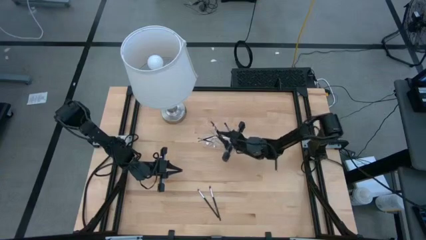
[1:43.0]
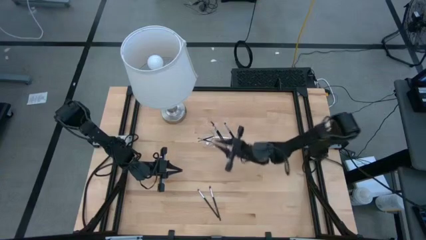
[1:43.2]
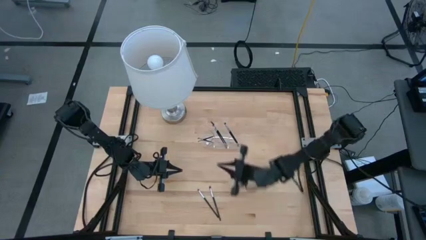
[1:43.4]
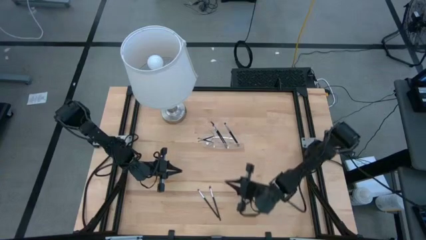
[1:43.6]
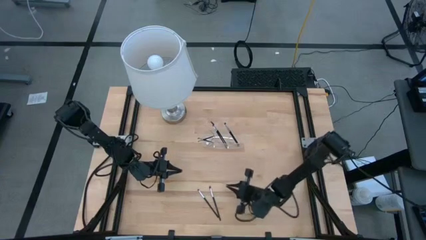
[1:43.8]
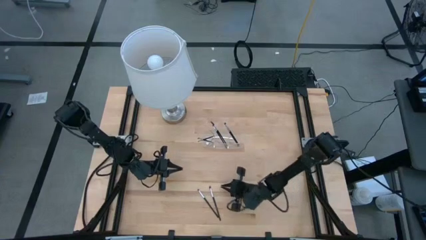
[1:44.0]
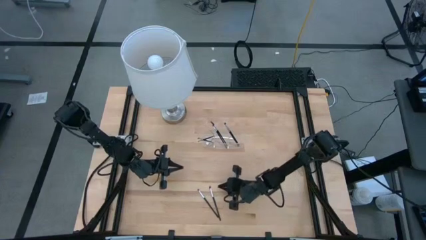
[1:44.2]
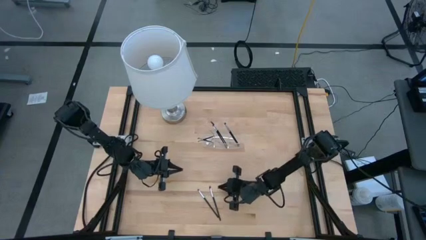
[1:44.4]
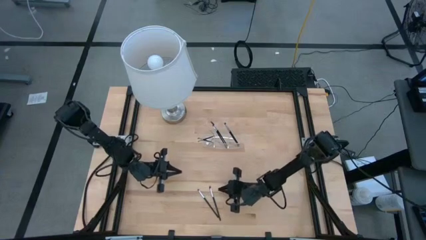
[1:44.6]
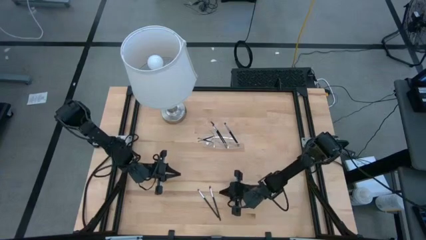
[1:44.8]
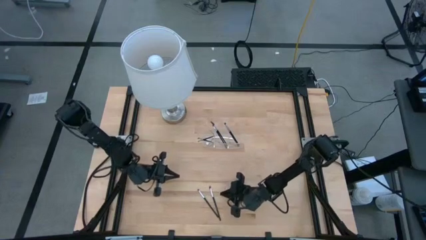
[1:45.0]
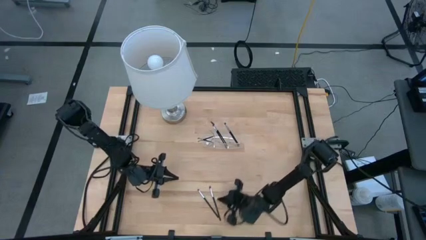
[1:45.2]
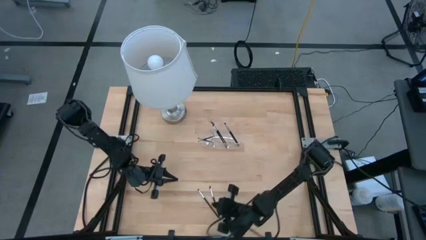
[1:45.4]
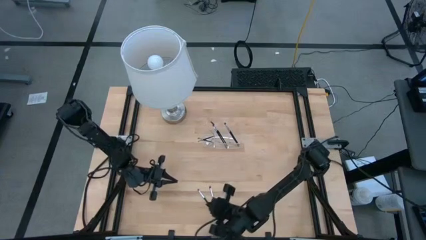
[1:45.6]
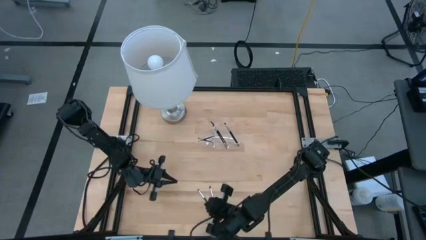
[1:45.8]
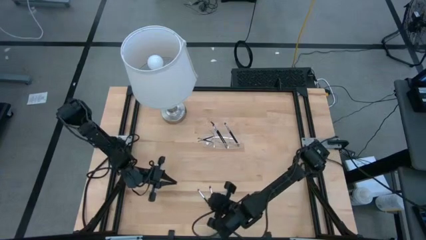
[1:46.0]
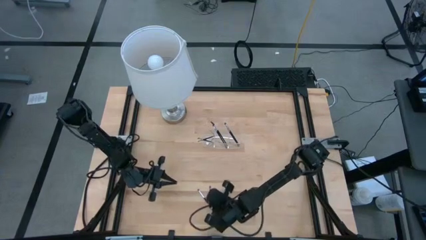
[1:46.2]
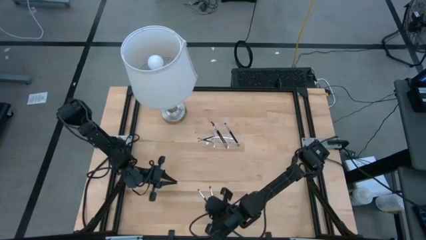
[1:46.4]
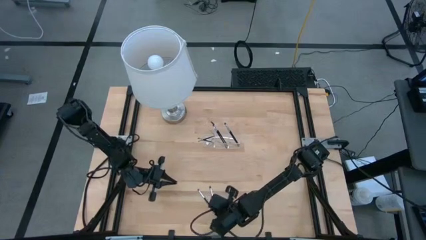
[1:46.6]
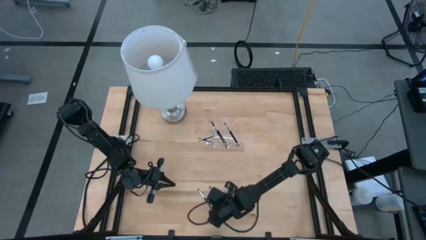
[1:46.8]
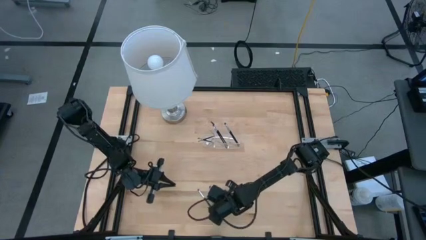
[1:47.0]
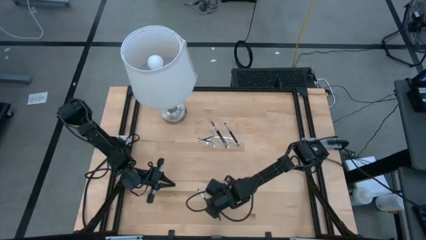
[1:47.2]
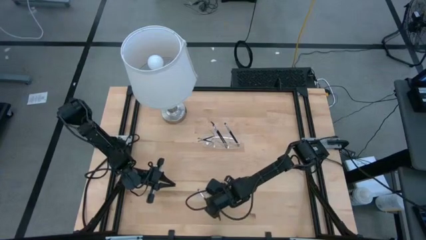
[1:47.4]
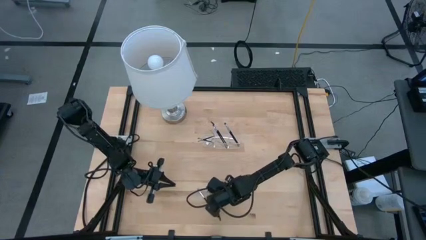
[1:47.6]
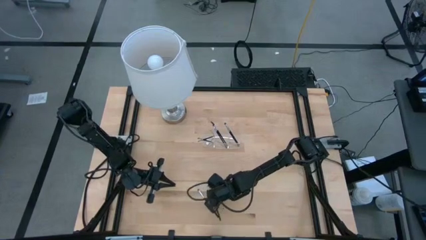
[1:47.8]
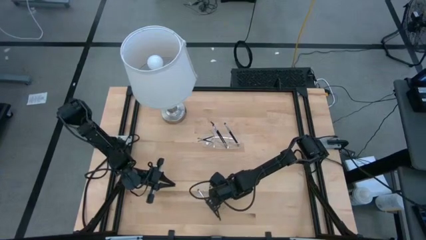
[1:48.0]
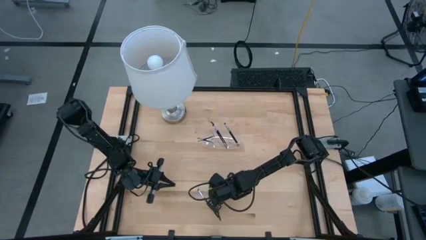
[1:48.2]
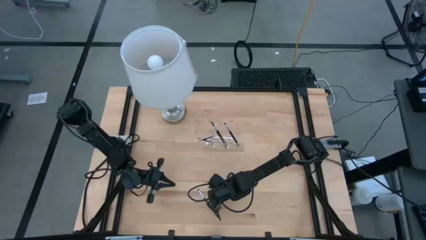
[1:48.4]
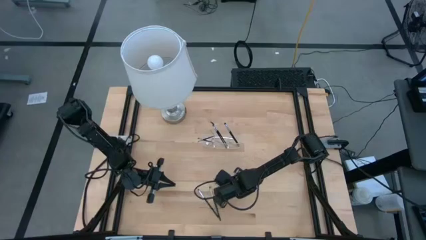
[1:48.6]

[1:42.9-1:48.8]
Task: Sort items
Put the eyeshadow brush into the transparent organizer

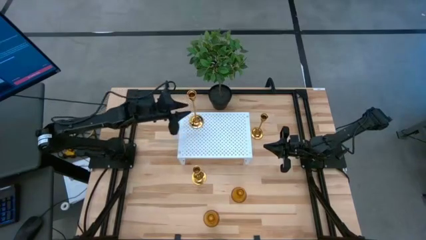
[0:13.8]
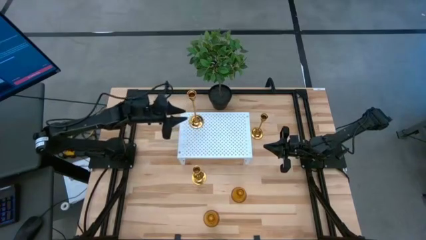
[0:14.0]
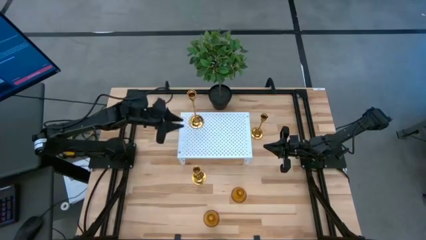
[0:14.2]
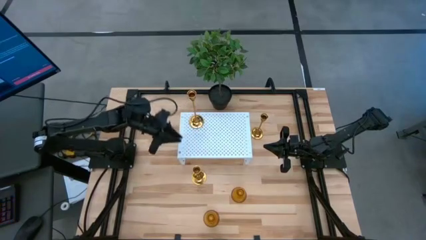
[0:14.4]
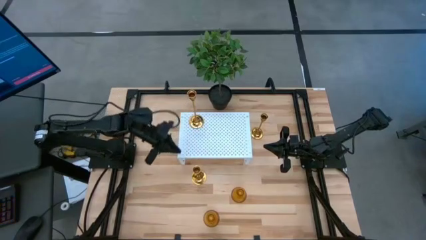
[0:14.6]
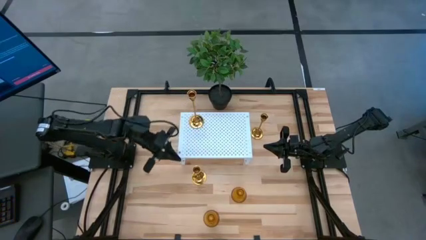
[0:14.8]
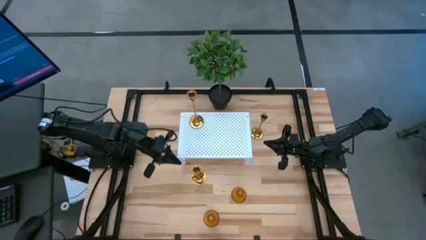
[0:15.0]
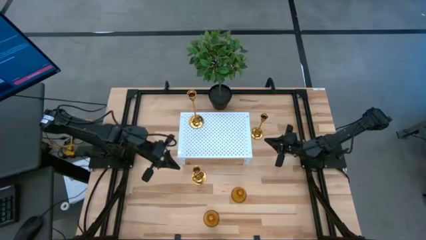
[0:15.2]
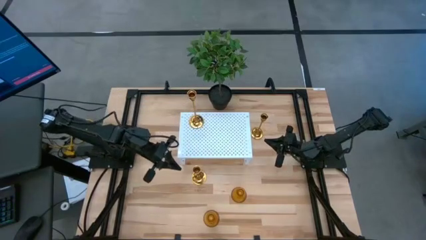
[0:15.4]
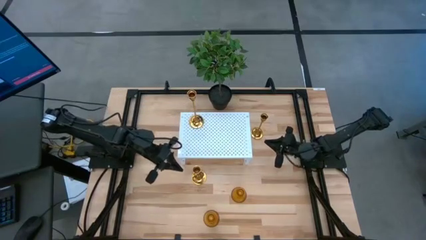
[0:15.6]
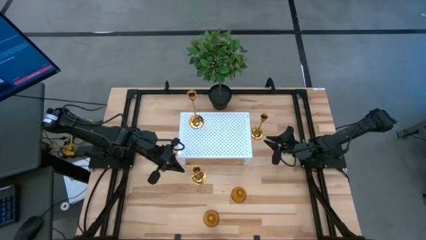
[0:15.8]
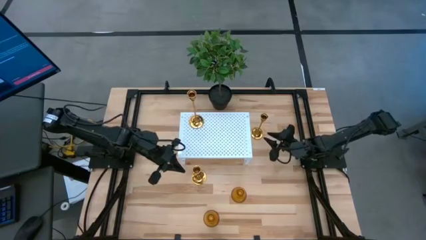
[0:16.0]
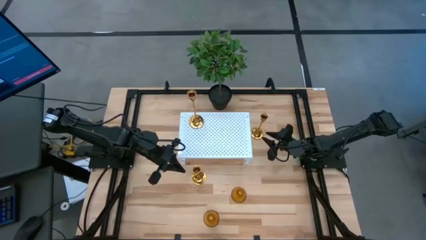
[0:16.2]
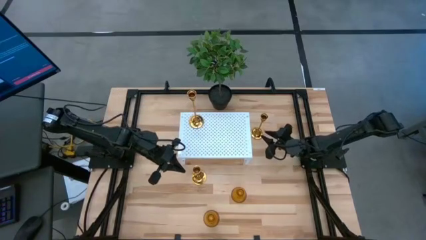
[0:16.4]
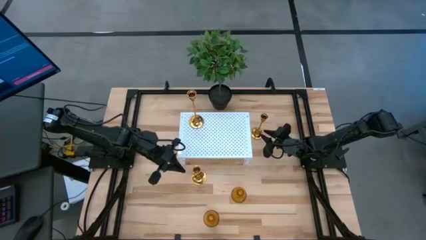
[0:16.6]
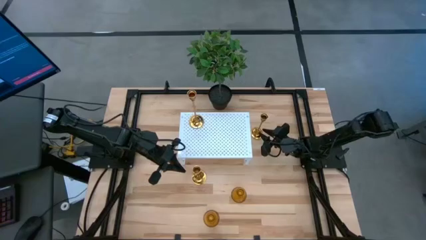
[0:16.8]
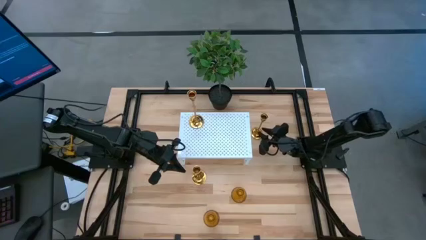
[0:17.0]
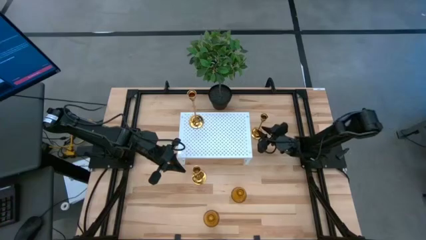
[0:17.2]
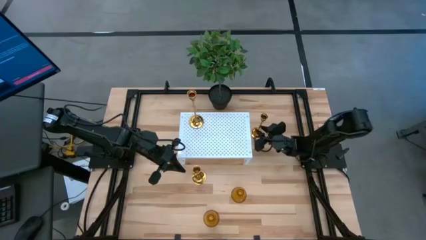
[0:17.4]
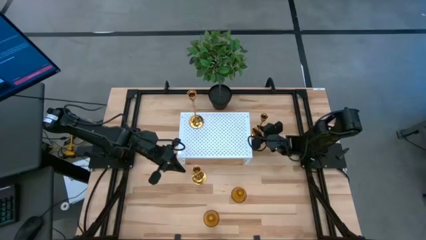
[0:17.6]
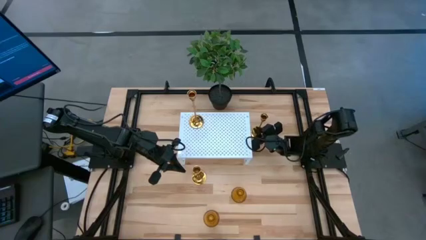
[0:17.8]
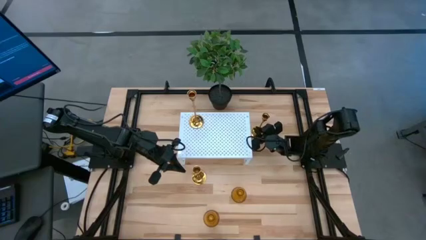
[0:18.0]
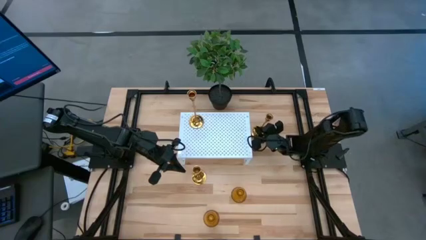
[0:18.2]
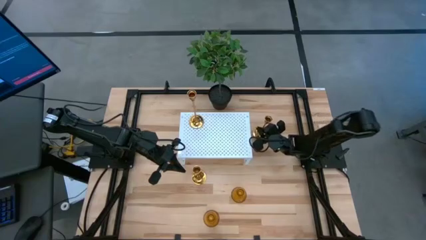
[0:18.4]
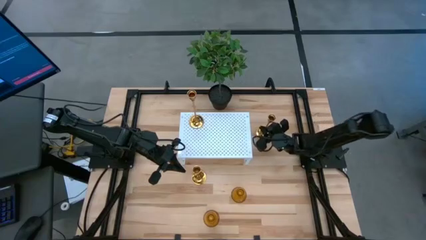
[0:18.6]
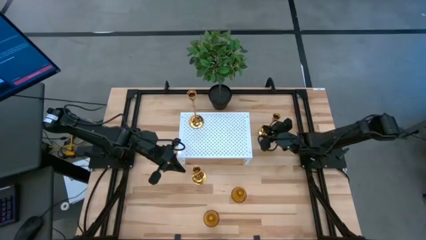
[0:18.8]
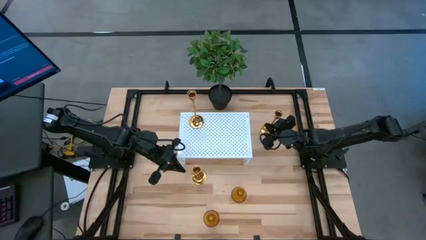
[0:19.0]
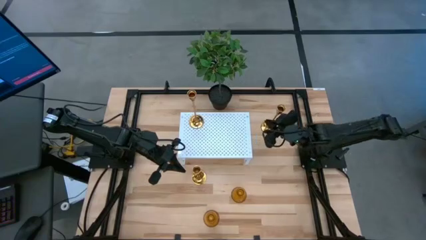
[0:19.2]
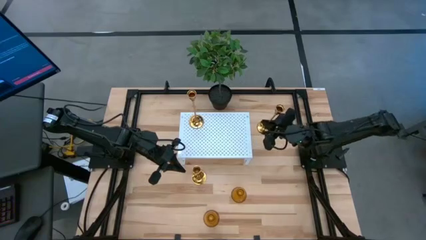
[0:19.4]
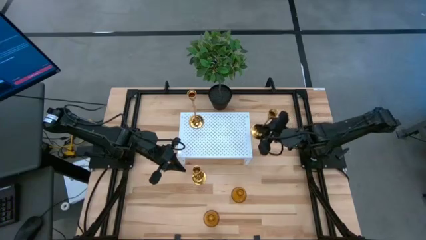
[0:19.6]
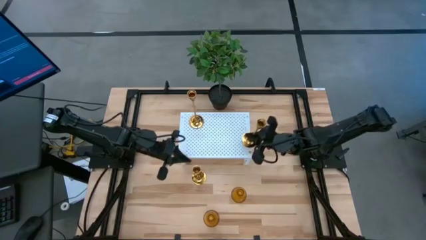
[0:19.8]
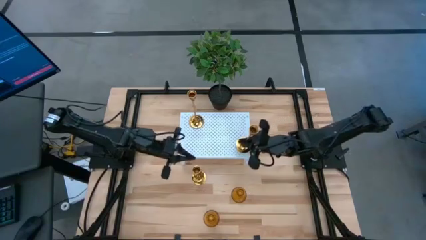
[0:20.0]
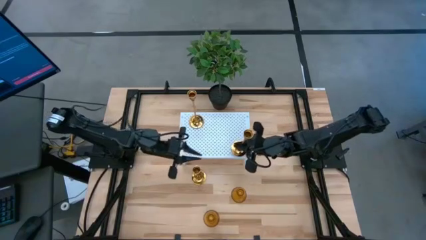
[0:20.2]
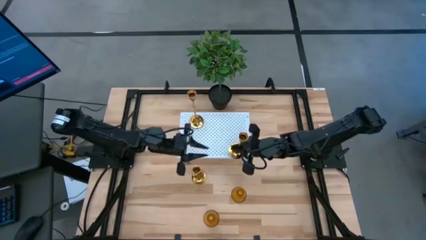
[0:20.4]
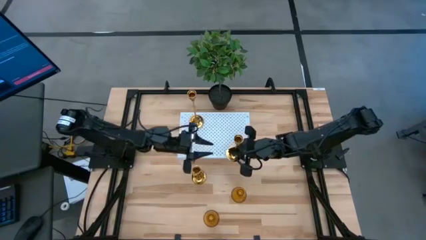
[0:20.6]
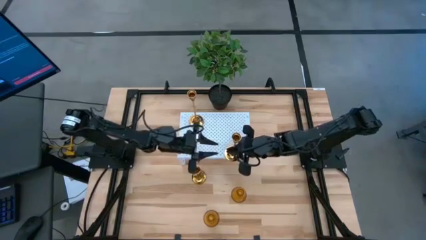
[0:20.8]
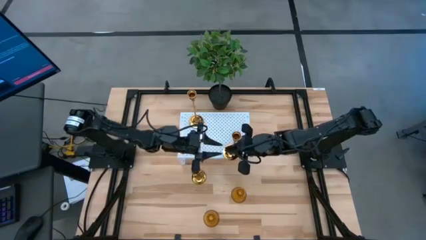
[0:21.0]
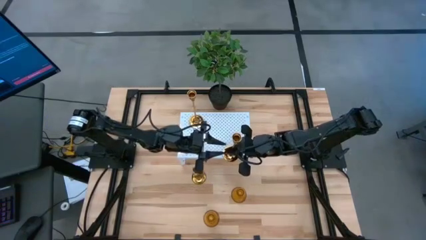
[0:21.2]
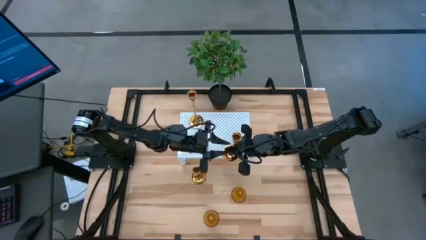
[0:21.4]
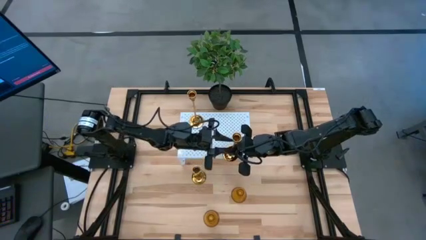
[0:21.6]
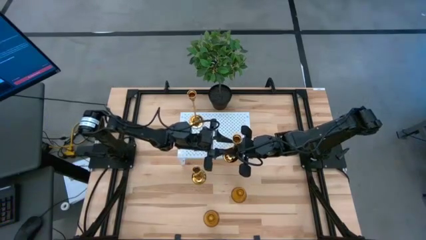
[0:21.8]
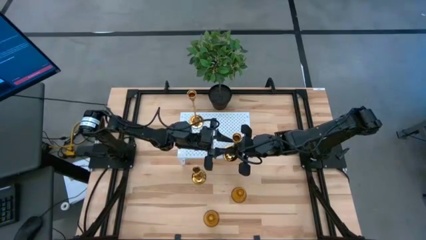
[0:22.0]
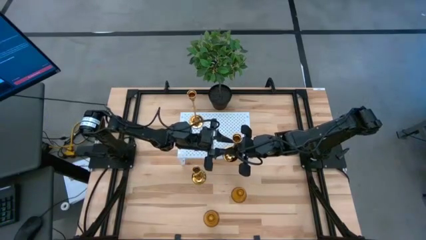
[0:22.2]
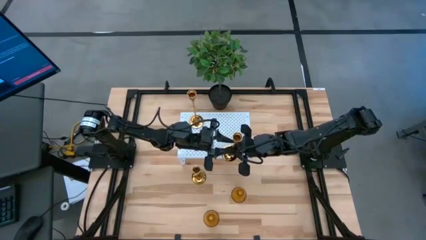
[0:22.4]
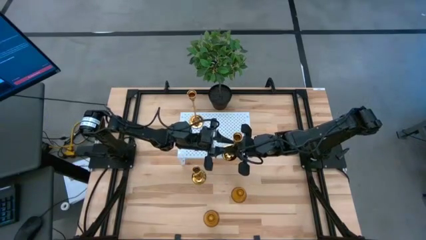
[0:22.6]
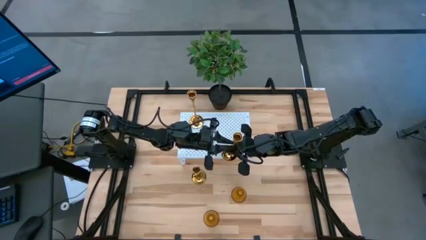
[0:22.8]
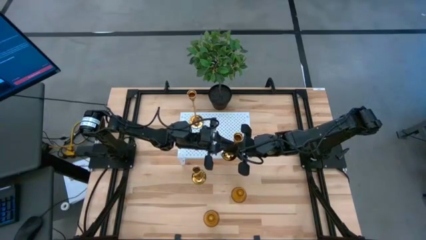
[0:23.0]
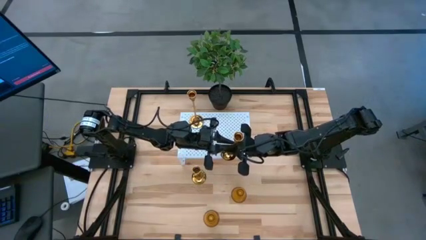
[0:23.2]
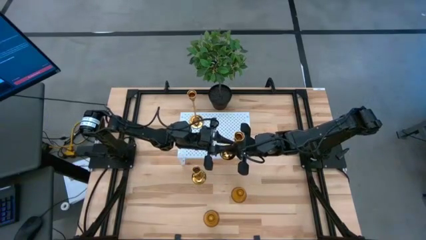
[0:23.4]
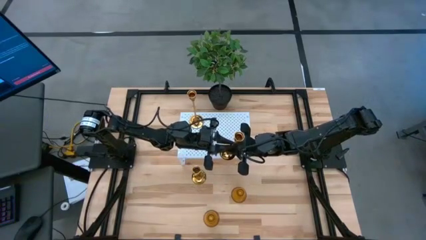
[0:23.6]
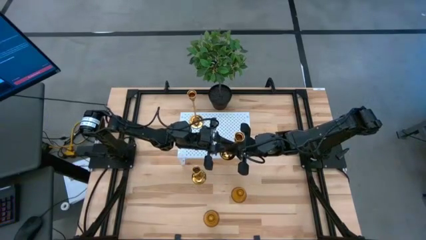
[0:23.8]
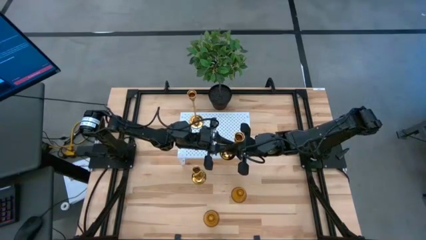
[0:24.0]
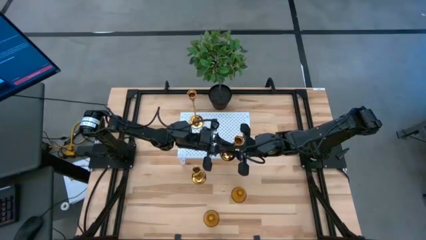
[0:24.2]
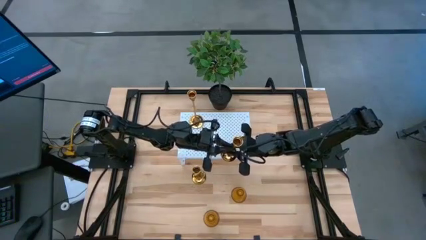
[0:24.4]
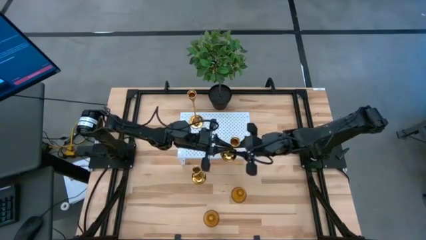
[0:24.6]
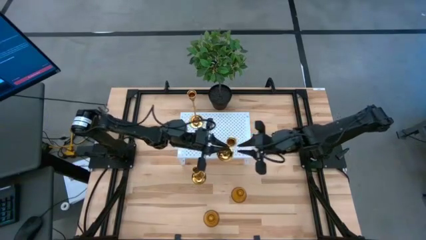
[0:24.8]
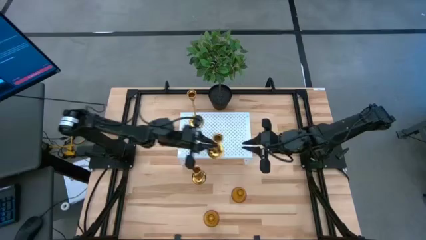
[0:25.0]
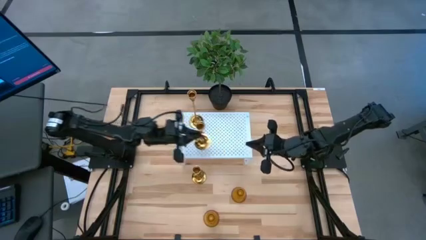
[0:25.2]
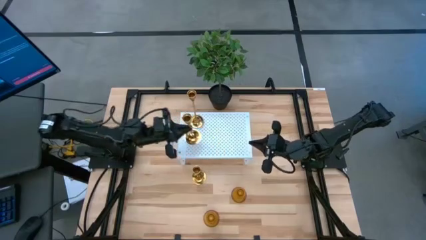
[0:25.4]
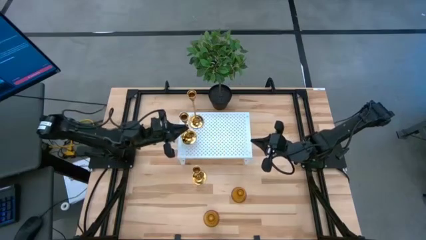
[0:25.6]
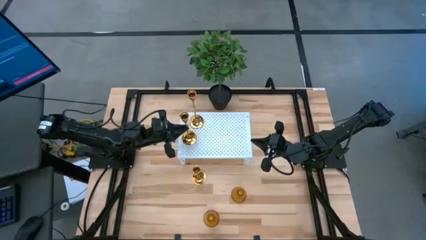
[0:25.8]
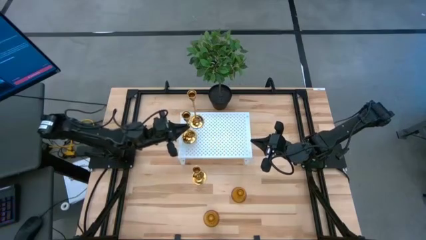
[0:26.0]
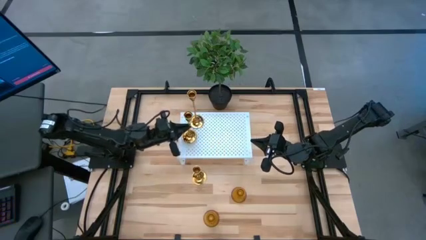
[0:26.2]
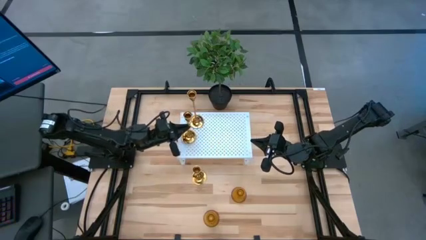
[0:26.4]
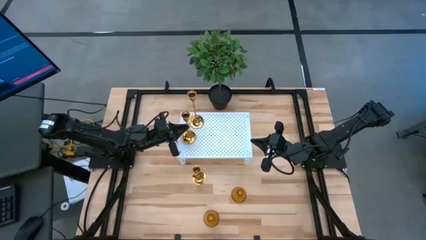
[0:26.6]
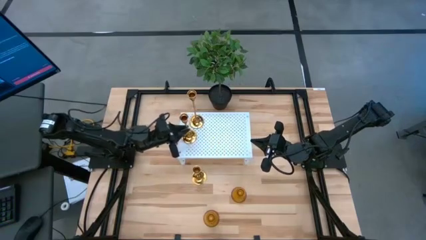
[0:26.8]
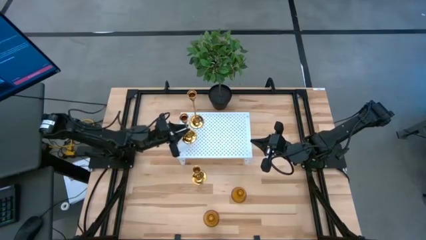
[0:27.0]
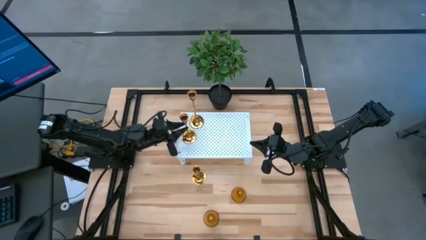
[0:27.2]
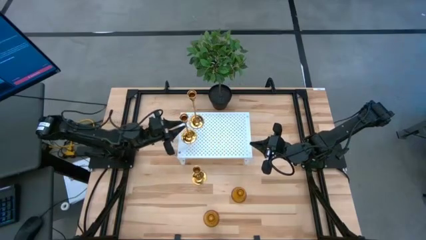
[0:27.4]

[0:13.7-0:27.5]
Task: Pick & Place candle stick holders
Put the top gold candle holder on the shelf
